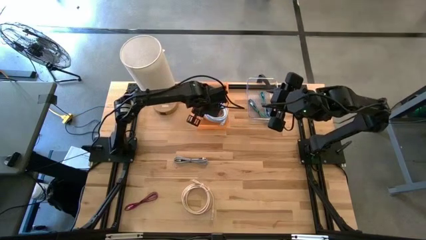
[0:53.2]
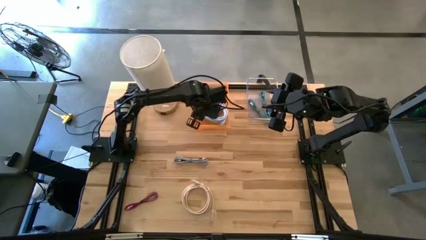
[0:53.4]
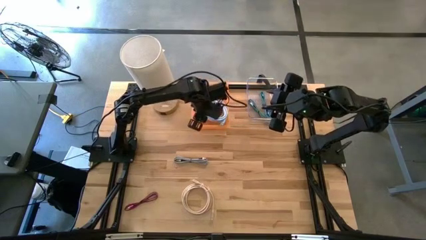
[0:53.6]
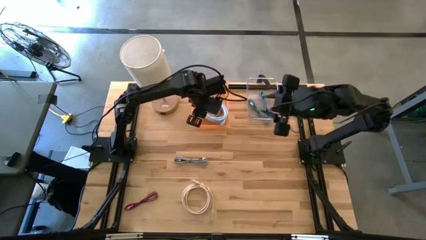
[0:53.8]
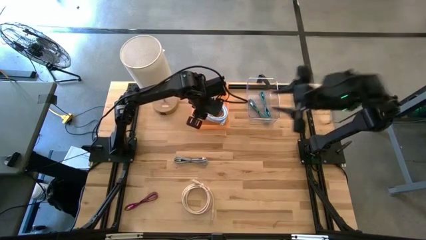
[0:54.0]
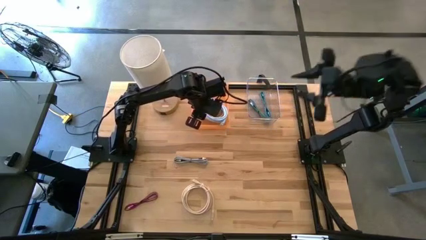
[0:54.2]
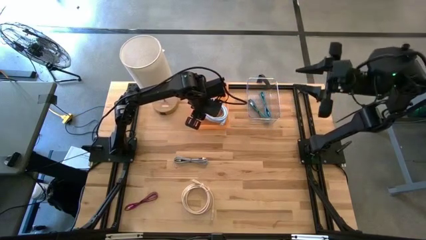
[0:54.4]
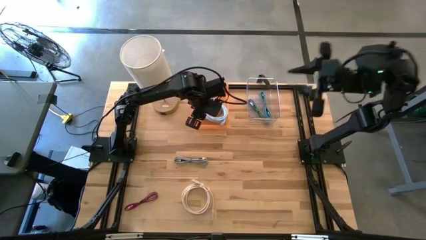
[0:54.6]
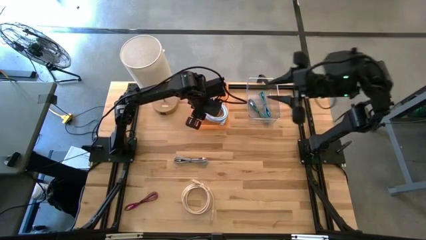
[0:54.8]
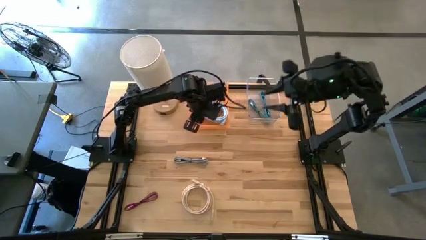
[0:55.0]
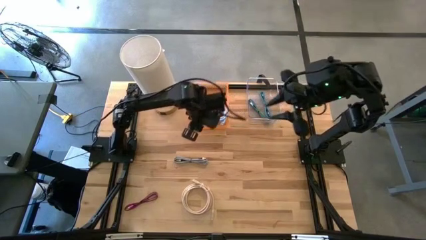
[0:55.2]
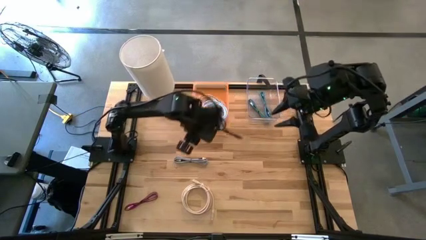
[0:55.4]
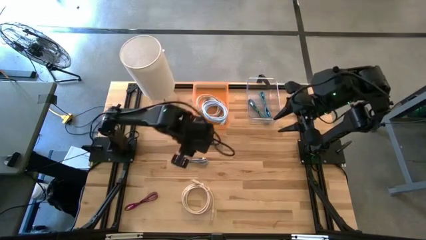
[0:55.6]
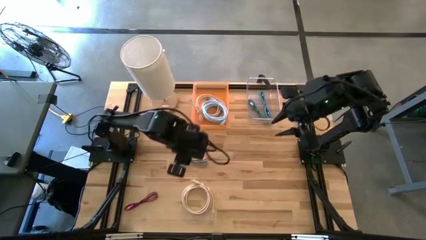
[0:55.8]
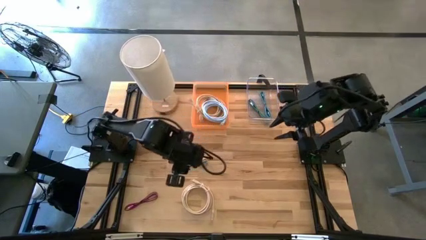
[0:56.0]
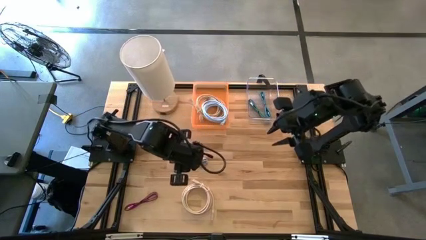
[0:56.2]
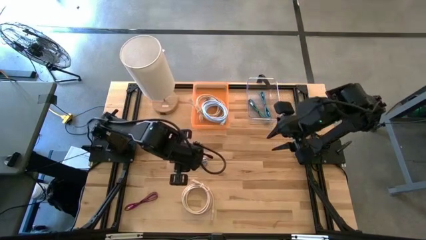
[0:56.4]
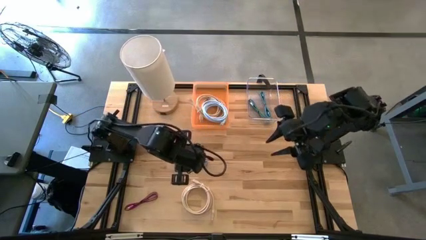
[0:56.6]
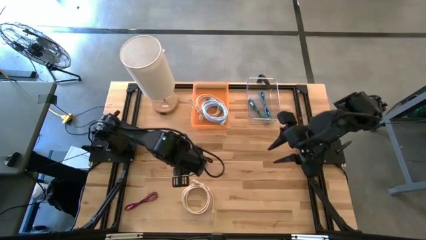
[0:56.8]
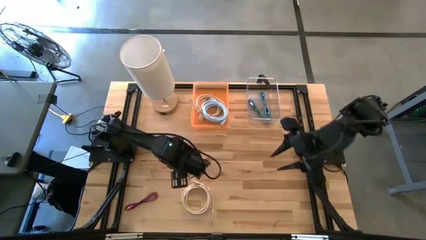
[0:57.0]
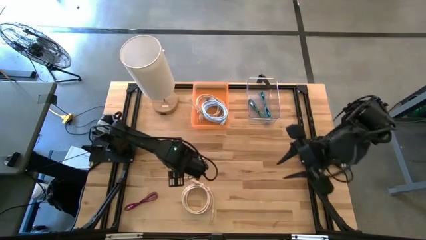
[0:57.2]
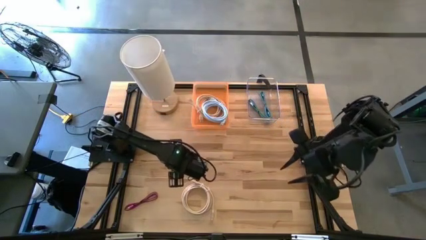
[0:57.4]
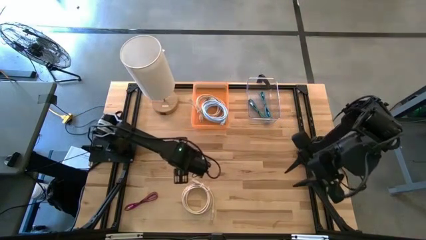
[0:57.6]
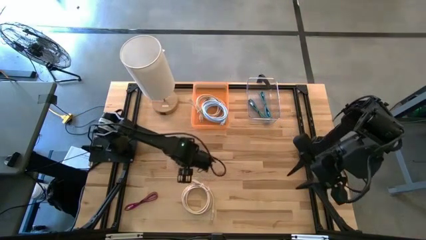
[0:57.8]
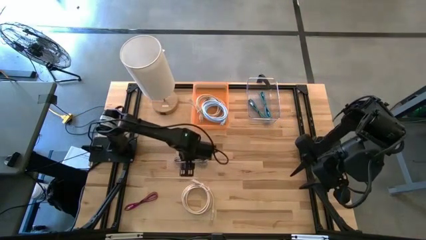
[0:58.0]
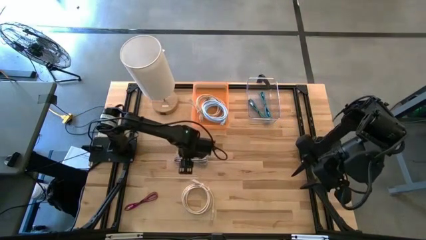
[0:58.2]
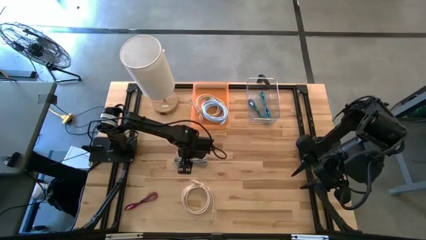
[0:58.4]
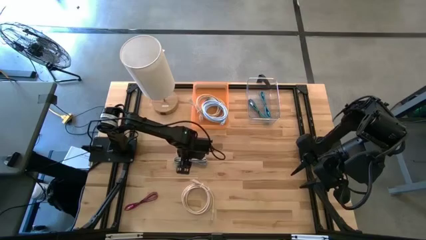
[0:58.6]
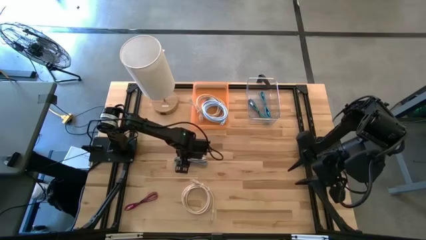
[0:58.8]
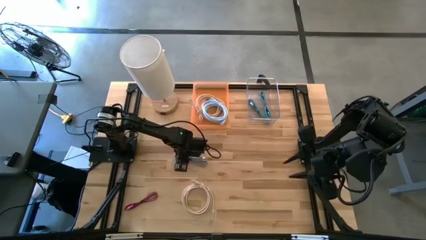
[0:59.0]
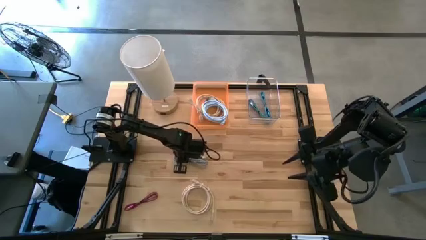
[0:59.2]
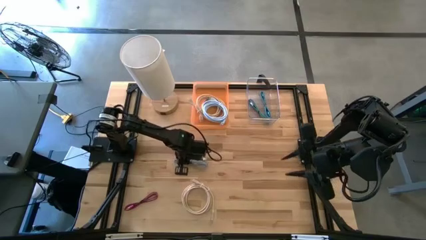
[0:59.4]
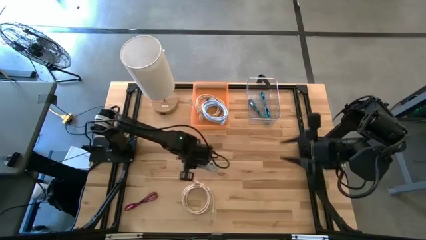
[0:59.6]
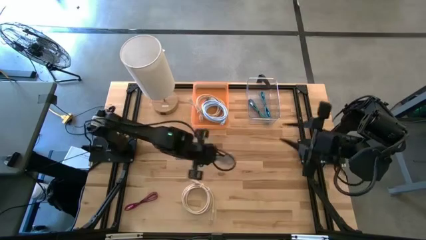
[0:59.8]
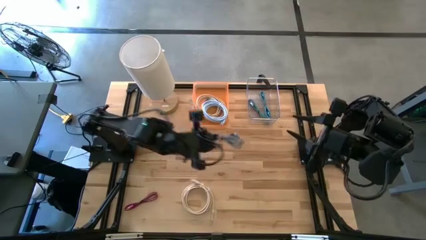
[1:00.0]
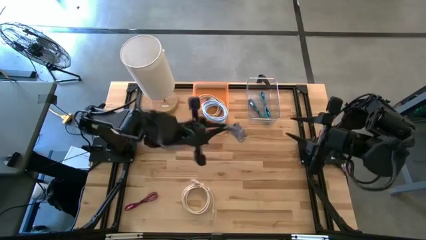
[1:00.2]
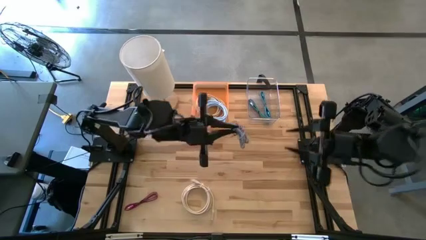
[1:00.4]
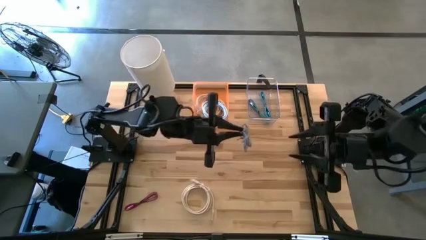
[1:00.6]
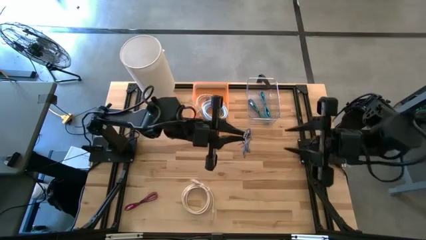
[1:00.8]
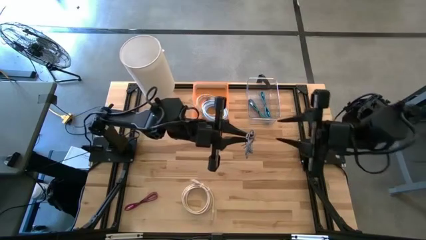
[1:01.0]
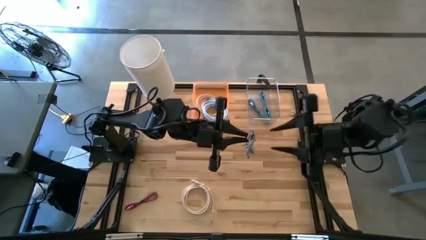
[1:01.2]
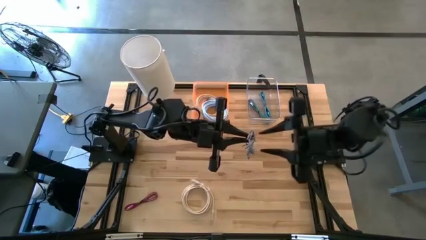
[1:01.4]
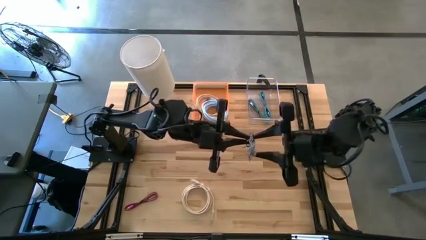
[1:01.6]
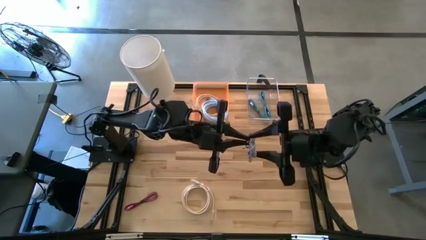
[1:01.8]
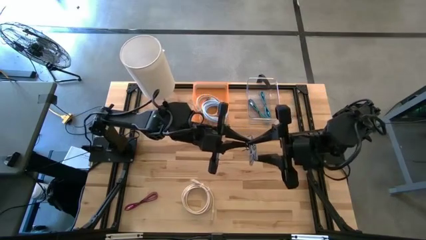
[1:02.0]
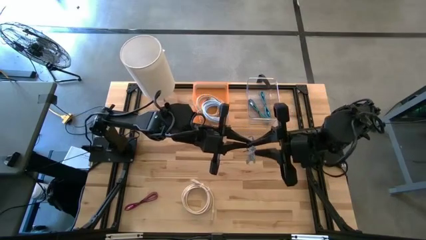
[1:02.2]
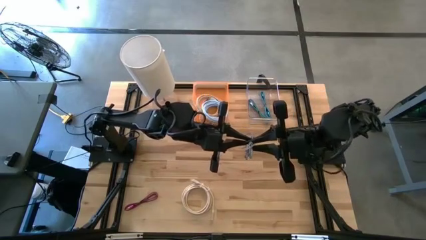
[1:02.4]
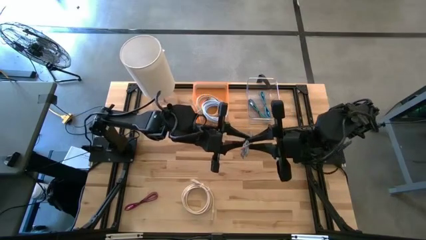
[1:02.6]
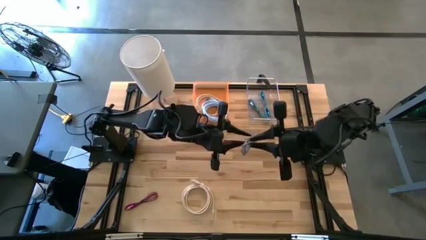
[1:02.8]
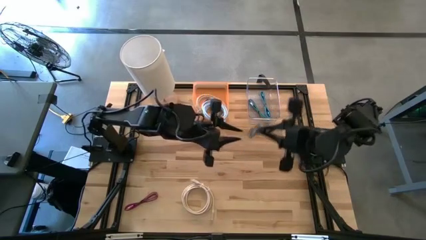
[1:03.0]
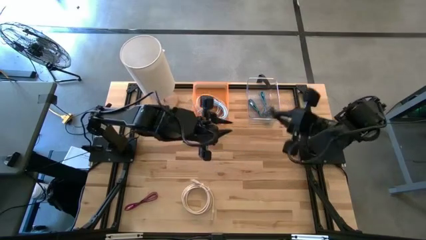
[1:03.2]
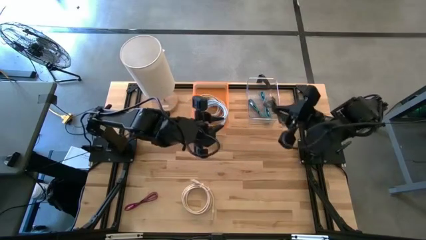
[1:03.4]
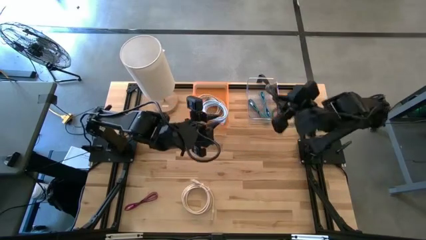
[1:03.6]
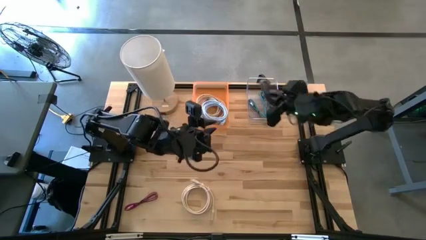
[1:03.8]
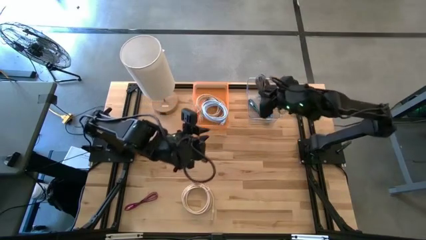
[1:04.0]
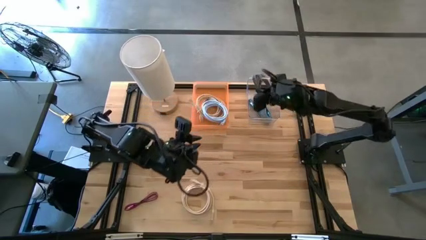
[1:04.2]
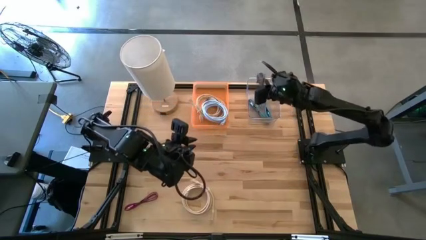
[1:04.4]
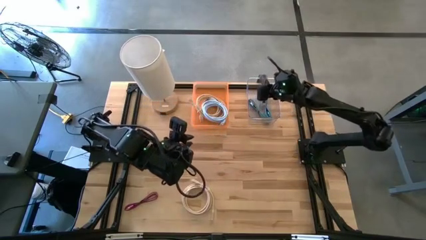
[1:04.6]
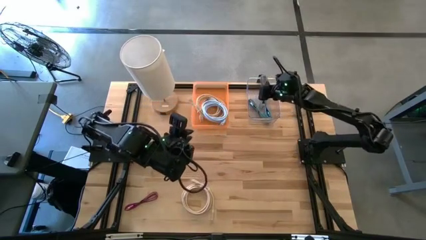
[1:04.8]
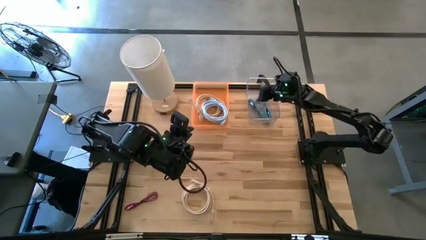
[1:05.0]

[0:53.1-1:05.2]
Task: Pick & Place USB Port
Put the black white charger cable into the transparent bin

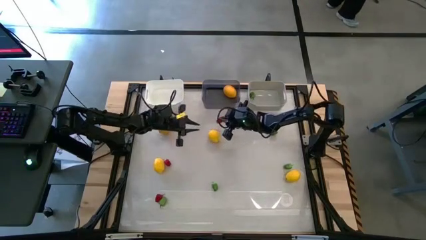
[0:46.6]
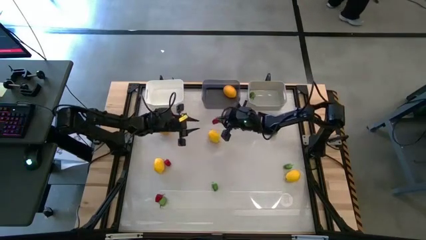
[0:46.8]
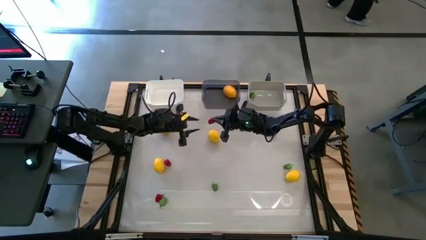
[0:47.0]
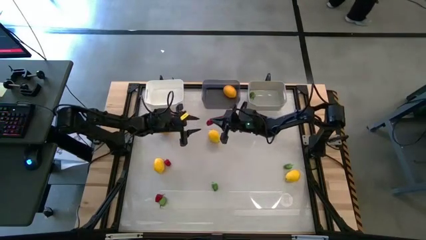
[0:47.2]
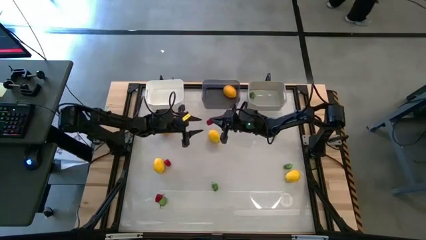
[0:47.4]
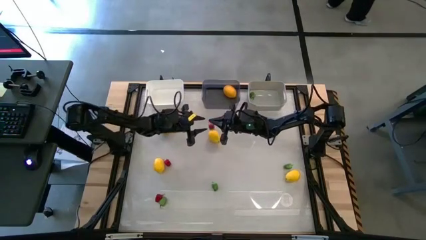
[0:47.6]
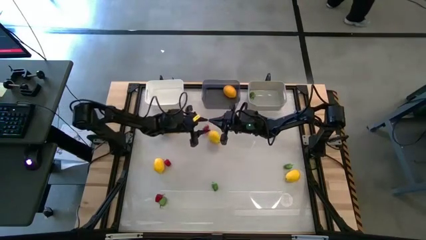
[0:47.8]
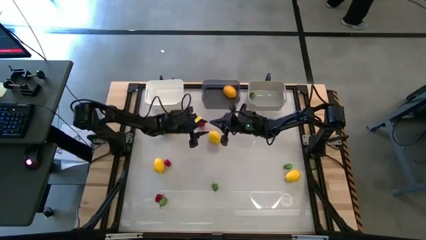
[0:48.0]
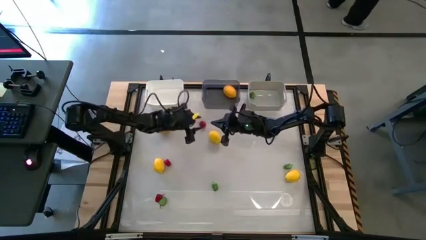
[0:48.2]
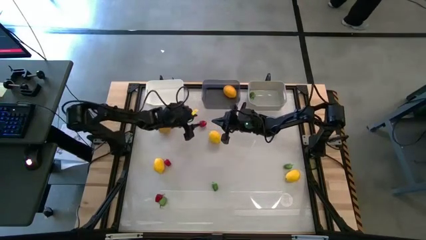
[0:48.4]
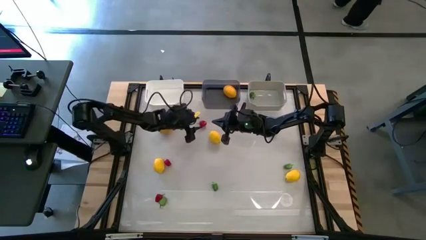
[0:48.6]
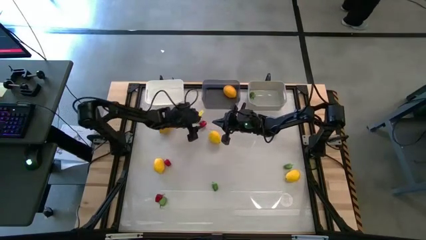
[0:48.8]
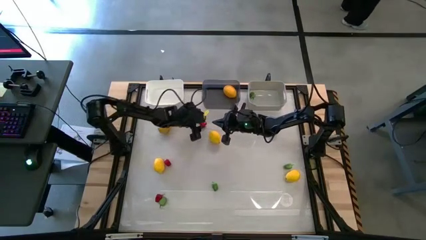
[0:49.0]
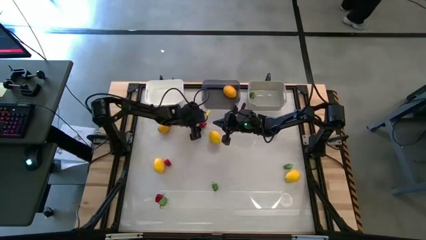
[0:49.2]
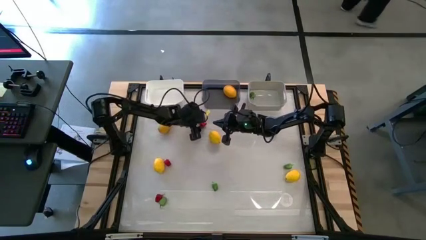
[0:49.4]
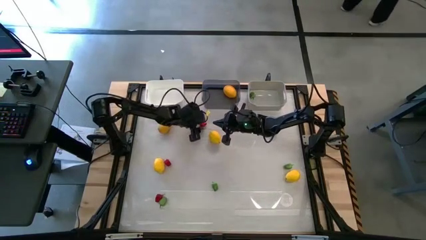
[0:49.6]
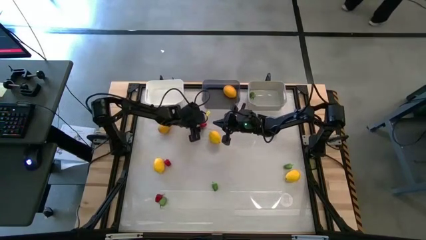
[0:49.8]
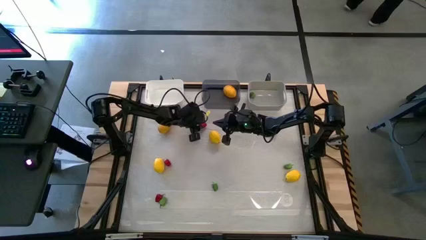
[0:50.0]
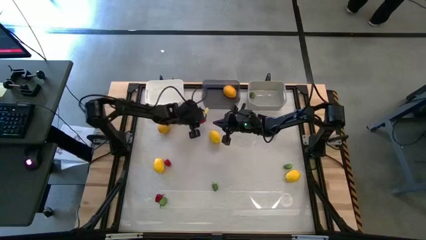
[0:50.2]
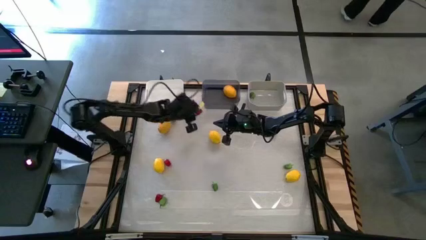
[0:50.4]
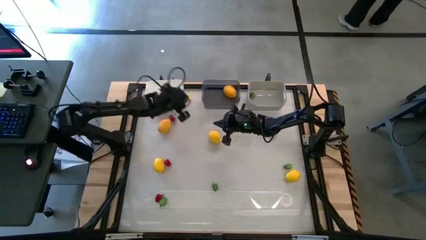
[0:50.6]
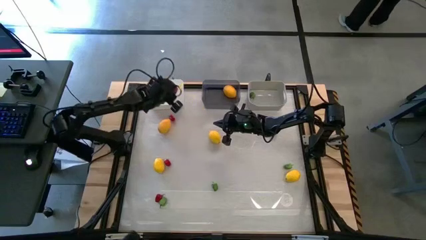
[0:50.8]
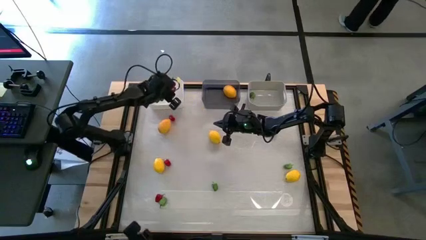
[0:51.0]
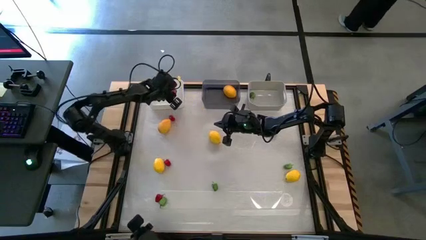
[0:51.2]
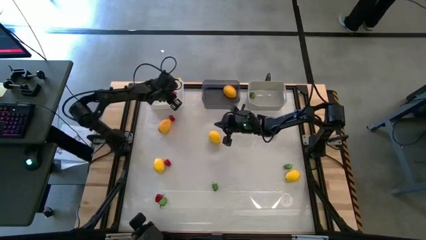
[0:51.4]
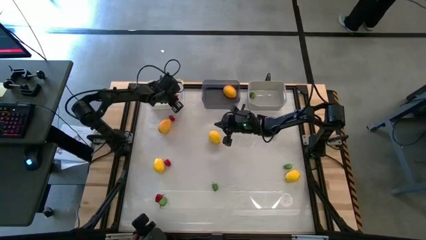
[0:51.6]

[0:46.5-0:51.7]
Task: Sort produce into baskets
Put the red bell pepper into the white bin
